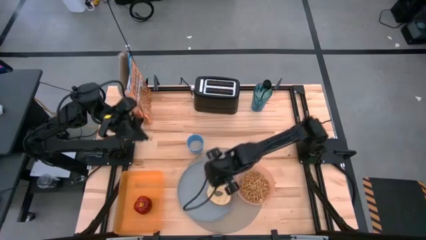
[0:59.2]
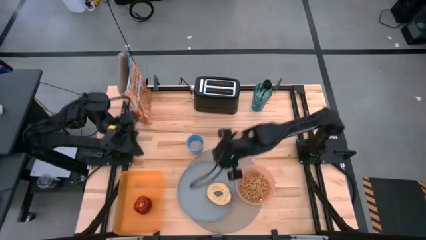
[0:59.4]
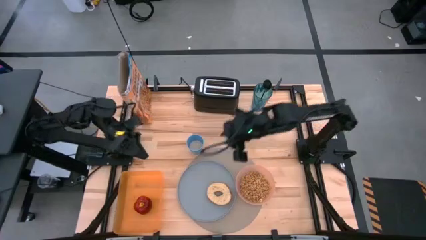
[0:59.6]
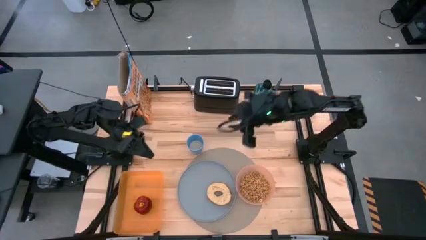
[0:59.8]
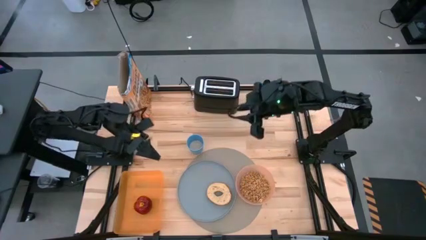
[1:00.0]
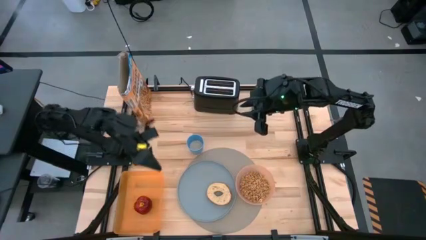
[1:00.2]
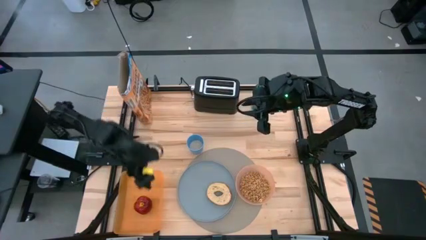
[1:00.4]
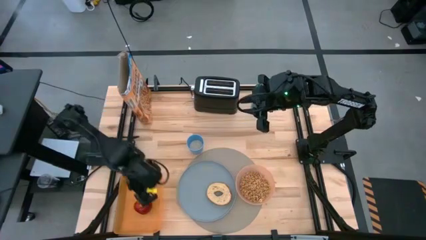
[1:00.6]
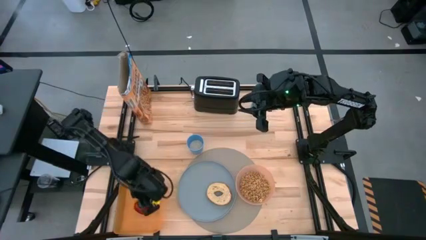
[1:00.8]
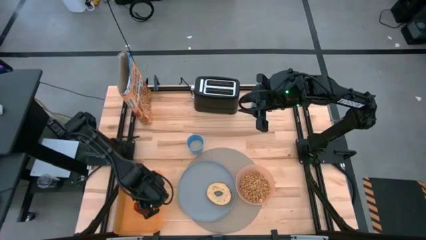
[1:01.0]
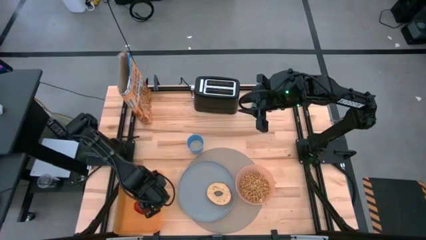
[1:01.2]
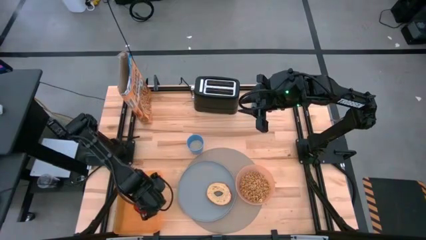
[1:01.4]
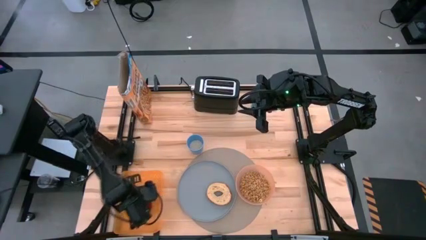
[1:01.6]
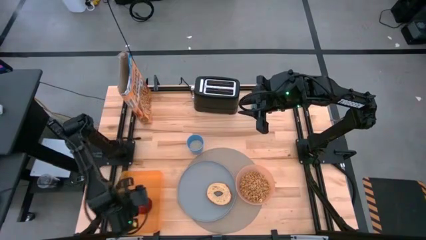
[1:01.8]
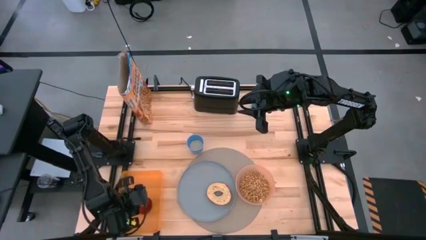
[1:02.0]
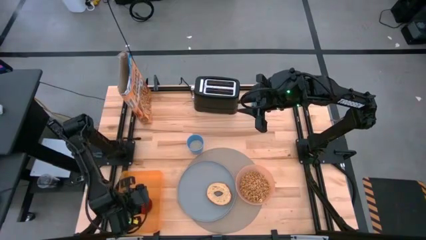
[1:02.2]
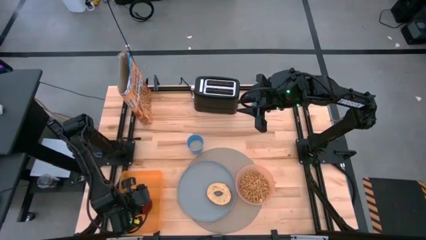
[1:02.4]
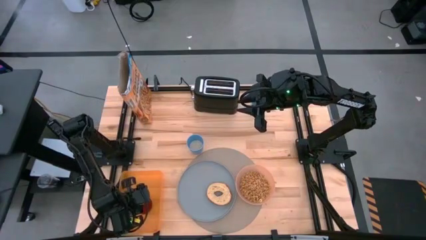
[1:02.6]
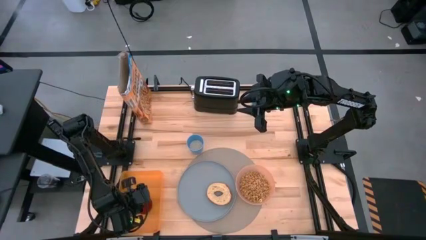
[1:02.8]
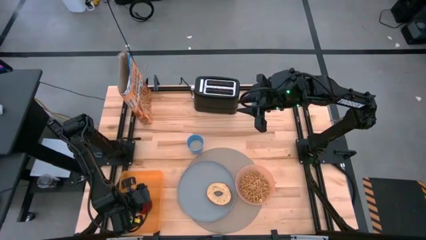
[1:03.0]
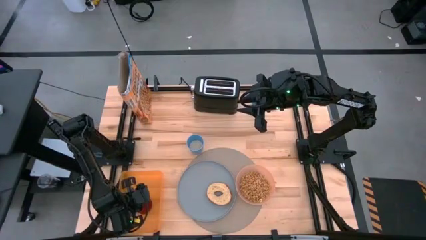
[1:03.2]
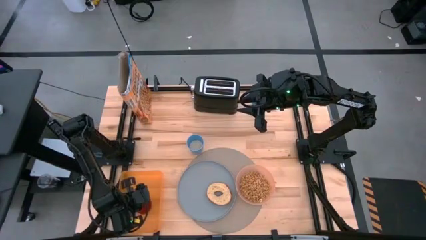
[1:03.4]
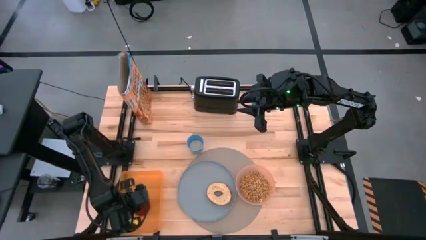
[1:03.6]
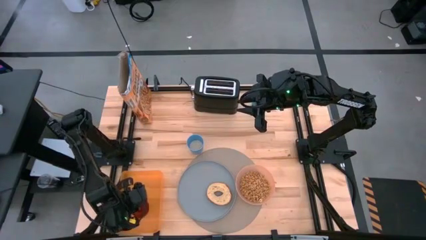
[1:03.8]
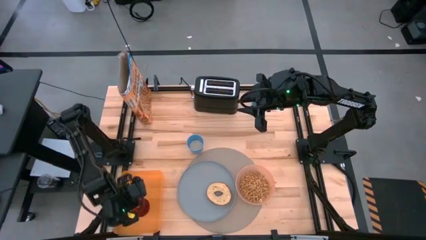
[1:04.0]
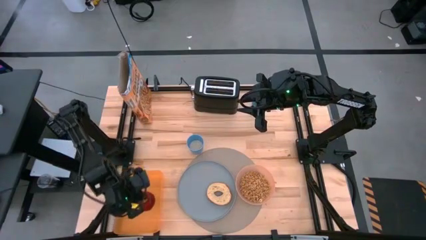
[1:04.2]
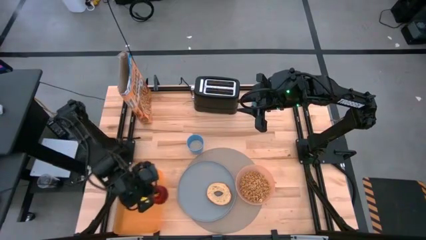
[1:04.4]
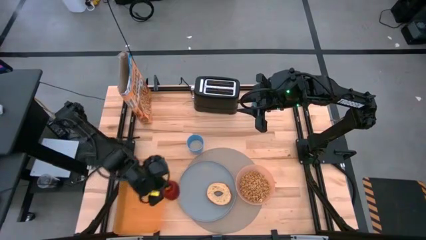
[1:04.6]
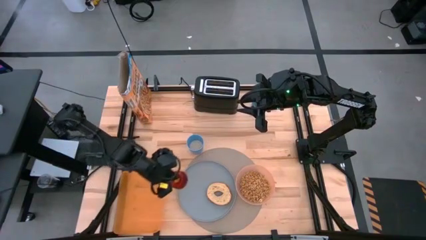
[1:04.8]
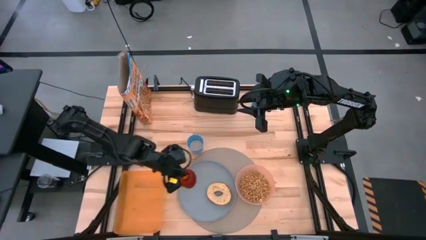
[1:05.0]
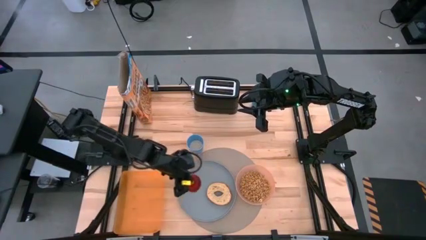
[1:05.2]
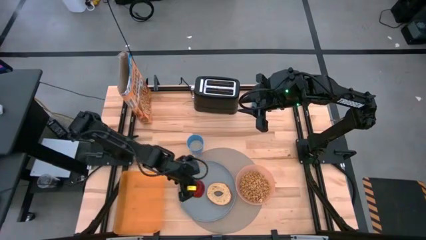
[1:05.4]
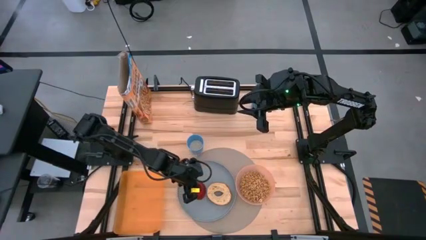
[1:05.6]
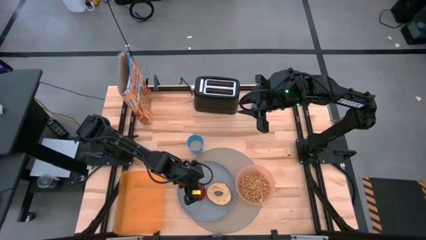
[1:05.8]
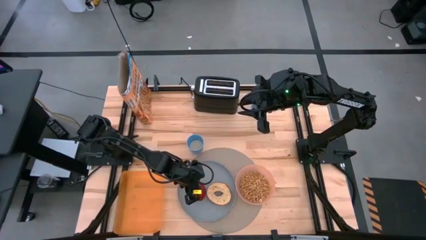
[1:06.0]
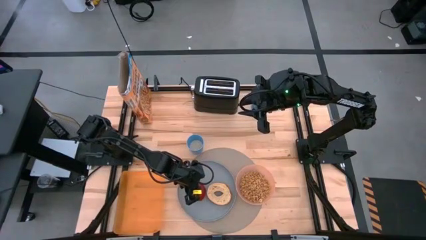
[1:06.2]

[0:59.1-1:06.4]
Task: Arrange a breakfast setting
Put the red apple from the orange bin on the gray plate

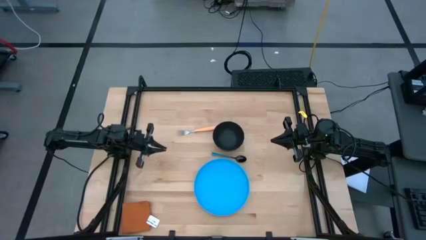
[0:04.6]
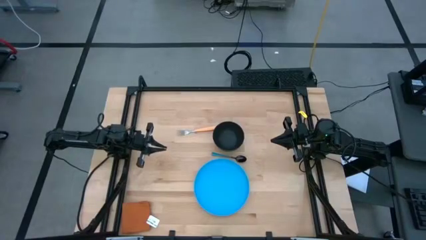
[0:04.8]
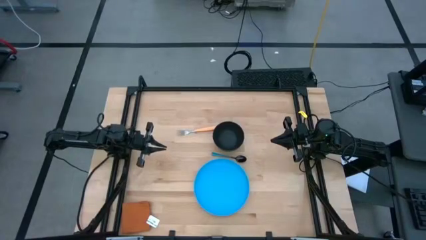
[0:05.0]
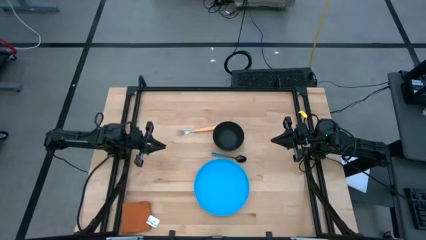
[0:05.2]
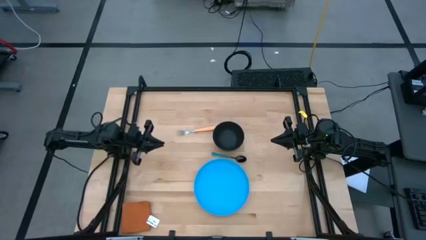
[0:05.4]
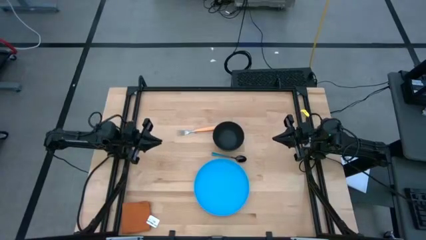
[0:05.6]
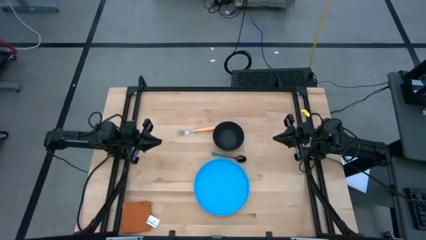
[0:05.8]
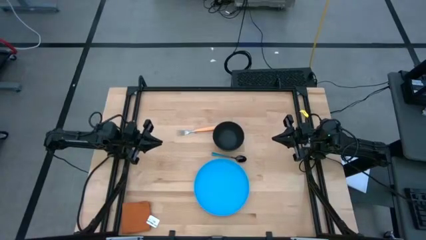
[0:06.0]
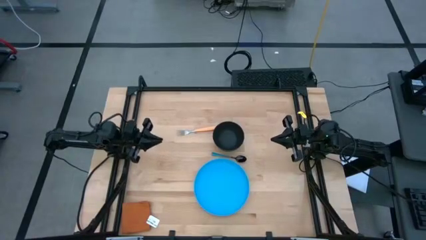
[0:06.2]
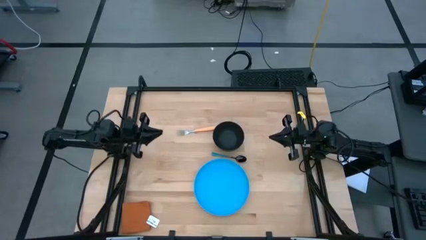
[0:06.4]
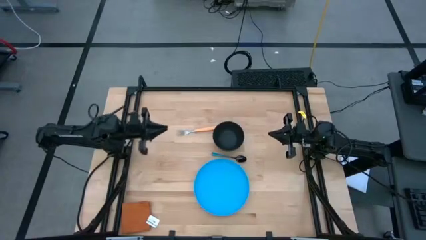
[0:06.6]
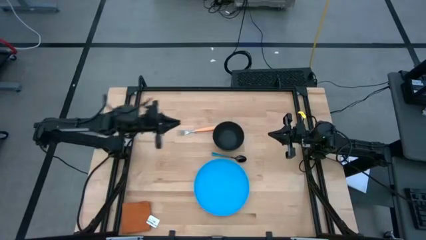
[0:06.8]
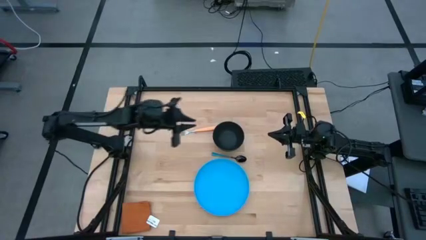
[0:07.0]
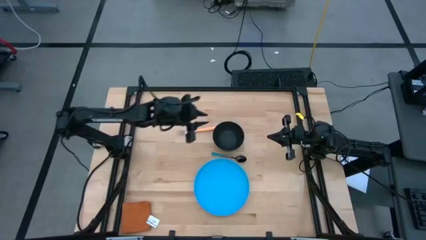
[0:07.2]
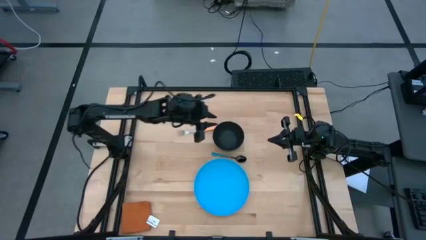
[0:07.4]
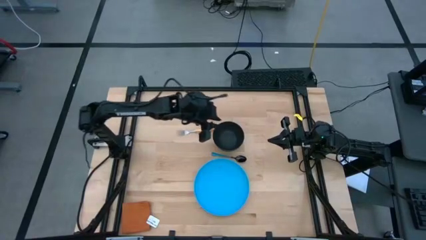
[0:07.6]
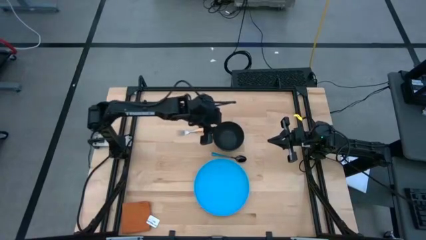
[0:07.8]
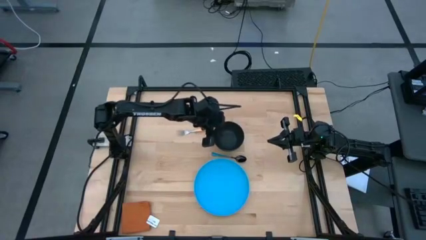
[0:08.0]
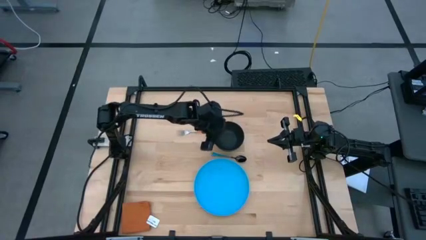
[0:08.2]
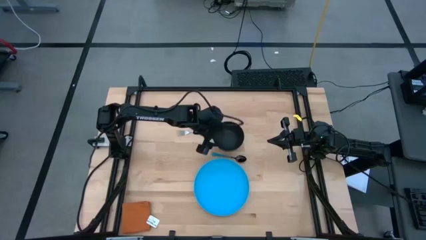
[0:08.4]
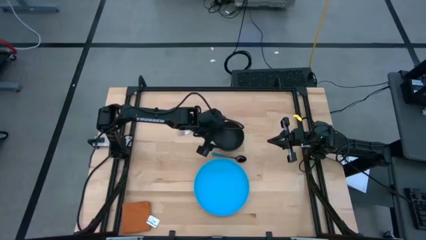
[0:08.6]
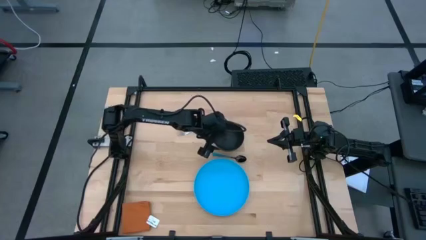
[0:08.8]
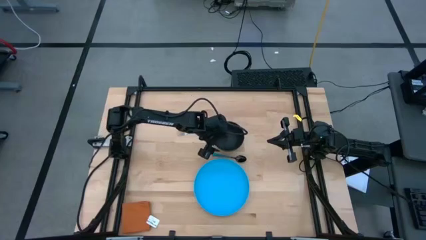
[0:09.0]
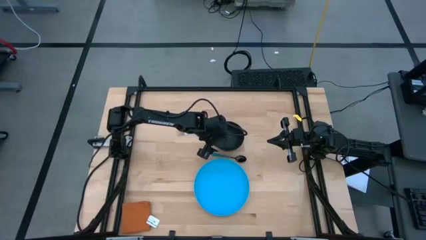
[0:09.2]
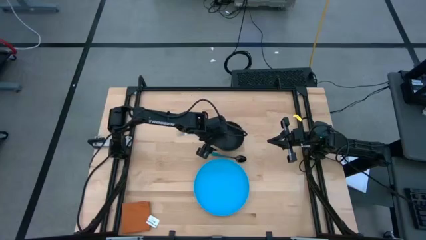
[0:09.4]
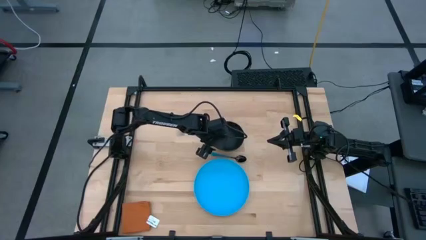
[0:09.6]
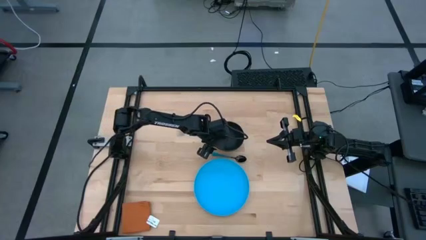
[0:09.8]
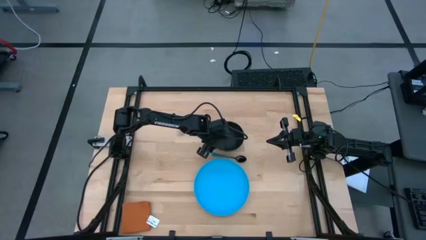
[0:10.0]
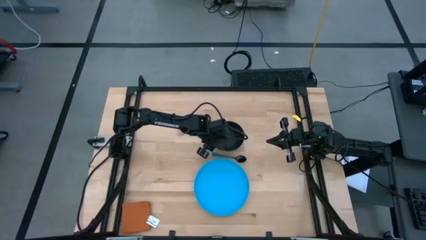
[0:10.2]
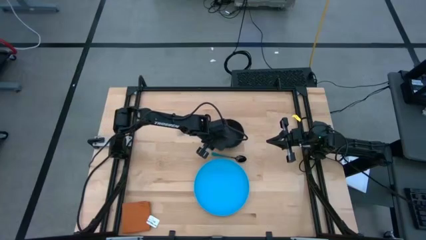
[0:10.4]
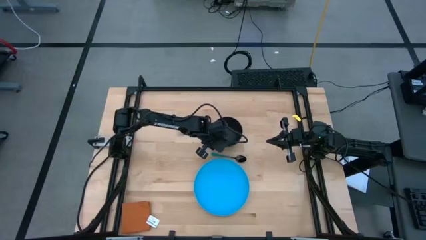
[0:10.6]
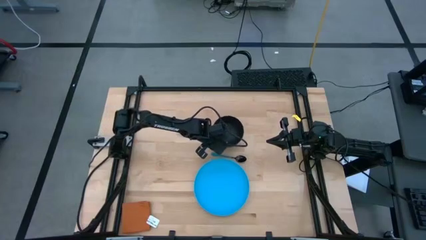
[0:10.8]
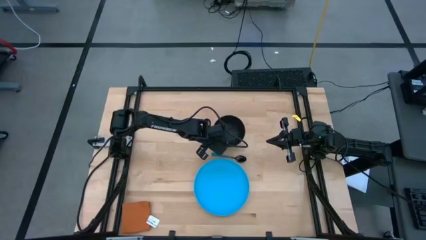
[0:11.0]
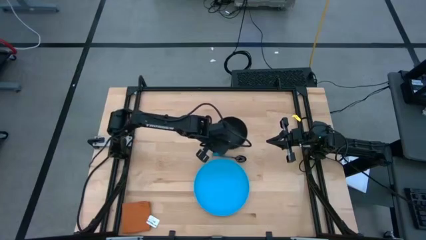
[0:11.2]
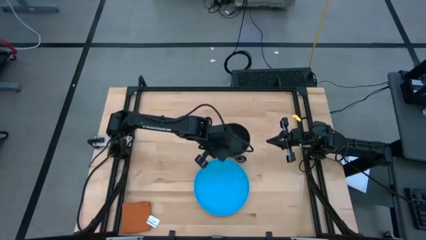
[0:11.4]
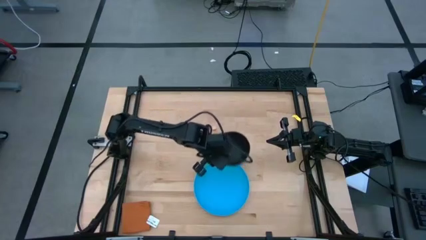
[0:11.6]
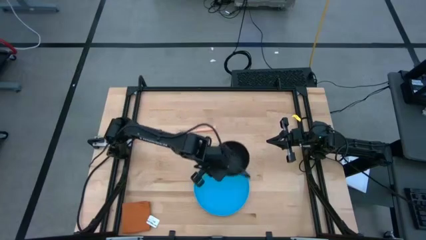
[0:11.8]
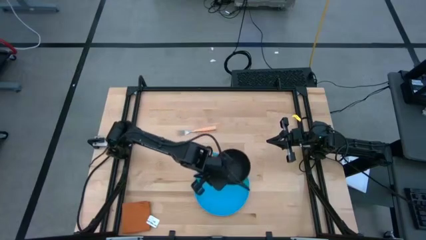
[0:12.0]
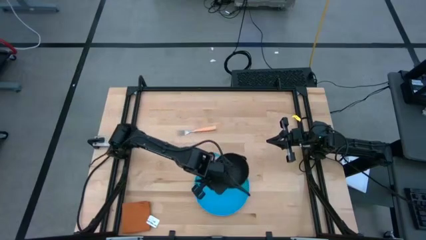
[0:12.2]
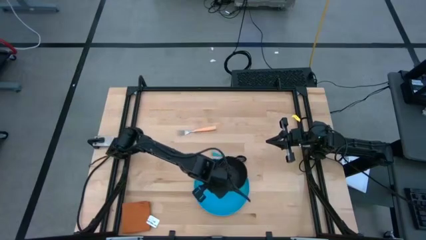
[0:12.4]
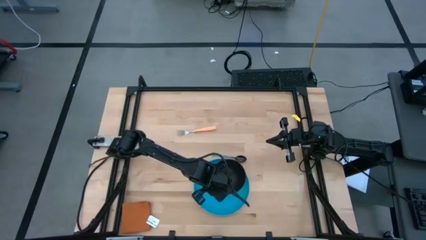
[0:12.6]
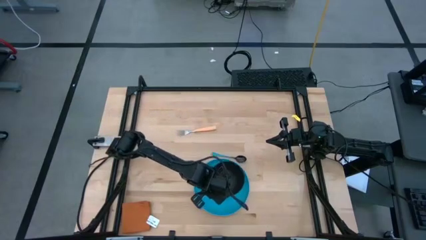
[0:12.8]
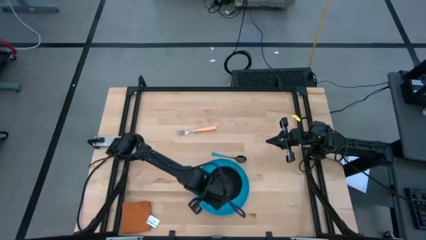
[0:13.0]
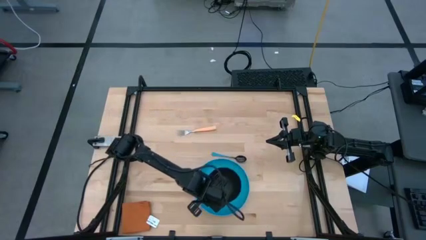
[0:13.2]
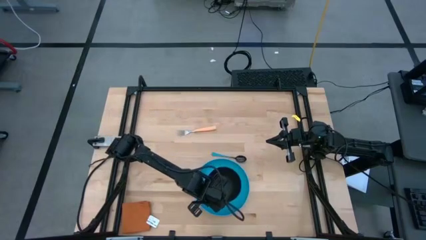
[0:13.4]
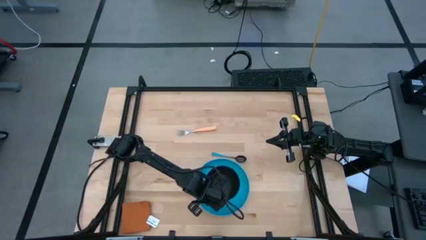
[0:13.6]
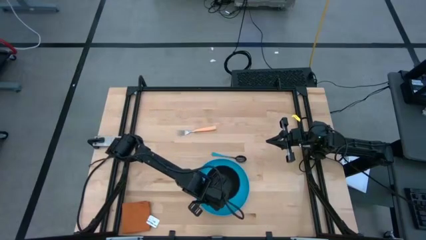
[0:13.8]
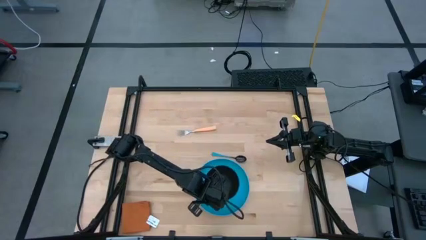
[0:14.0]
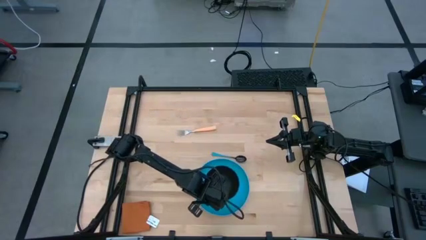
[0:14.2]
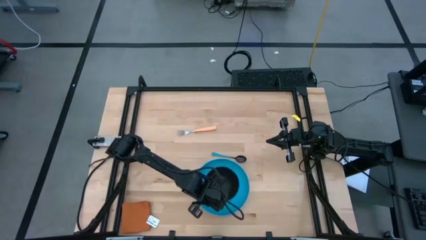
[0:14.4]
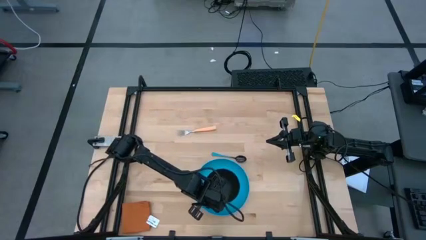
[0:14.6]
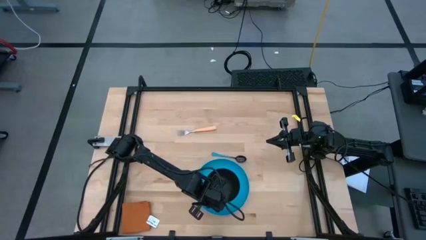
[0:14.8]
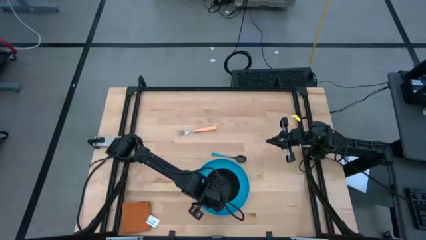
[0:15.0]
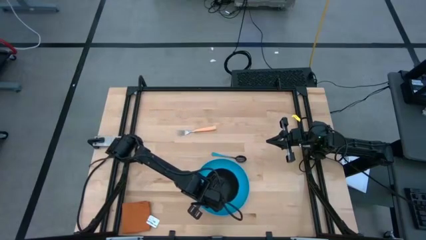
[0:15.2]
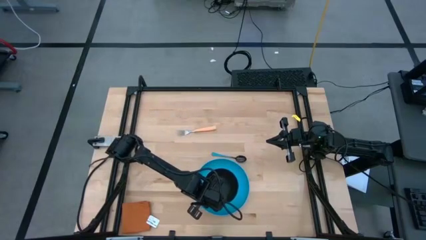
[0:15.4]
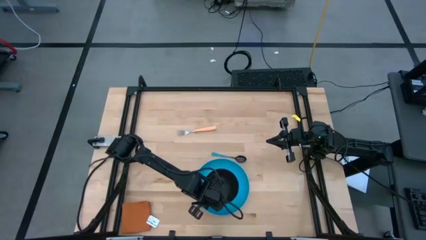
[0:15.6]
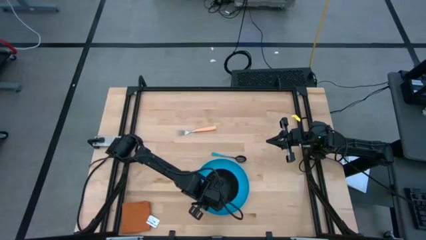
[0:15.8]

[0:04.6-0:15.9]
Task: Set table place
Put the bowl on top of the plate
